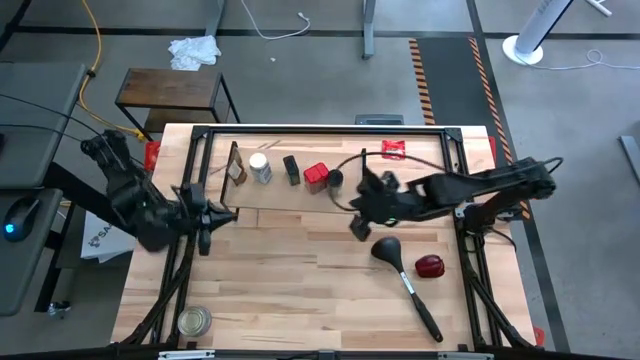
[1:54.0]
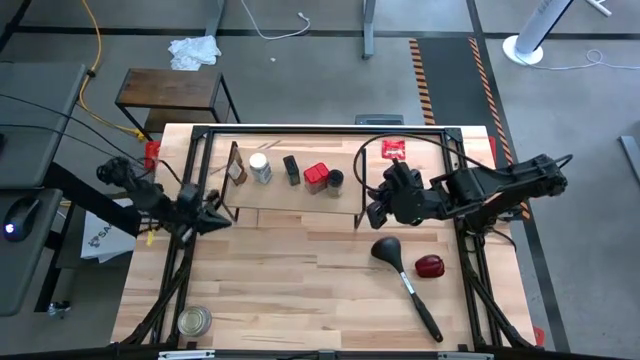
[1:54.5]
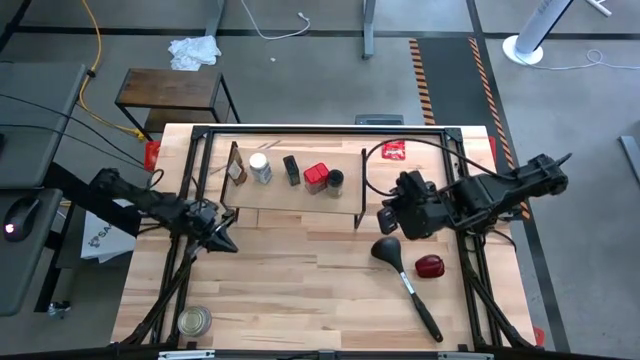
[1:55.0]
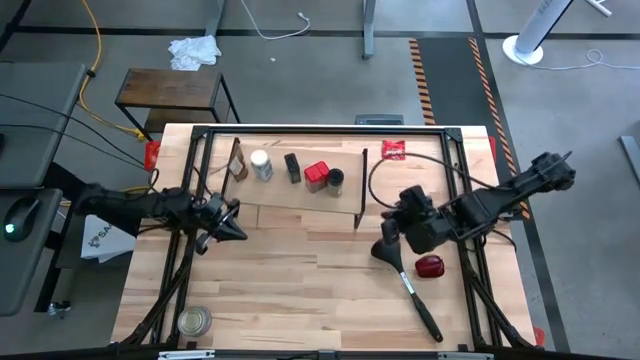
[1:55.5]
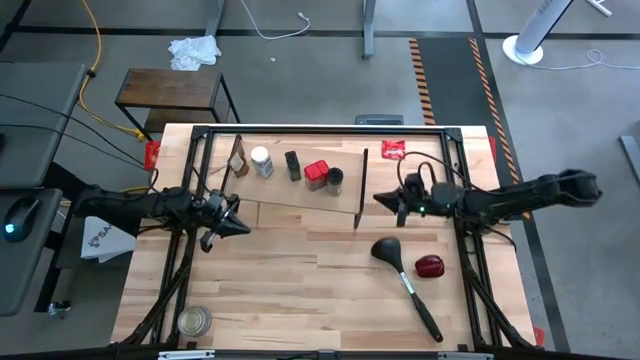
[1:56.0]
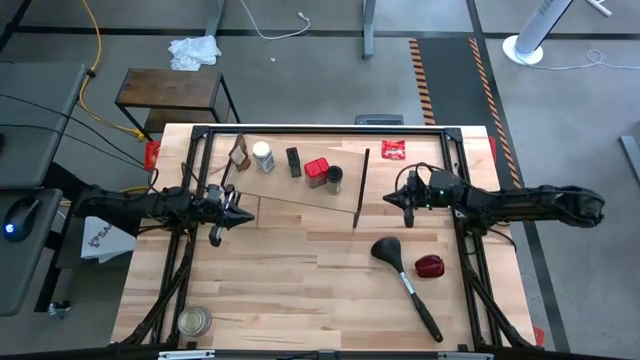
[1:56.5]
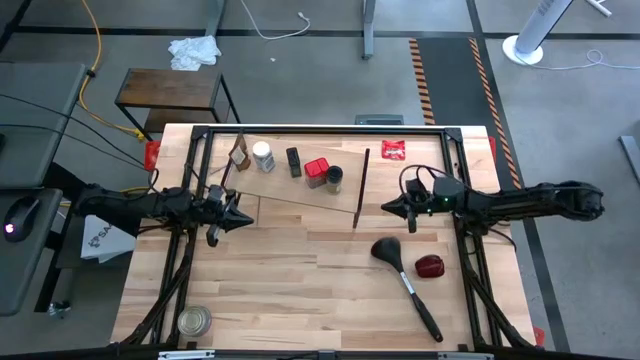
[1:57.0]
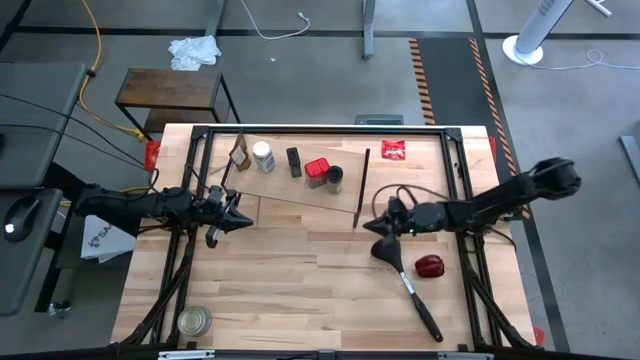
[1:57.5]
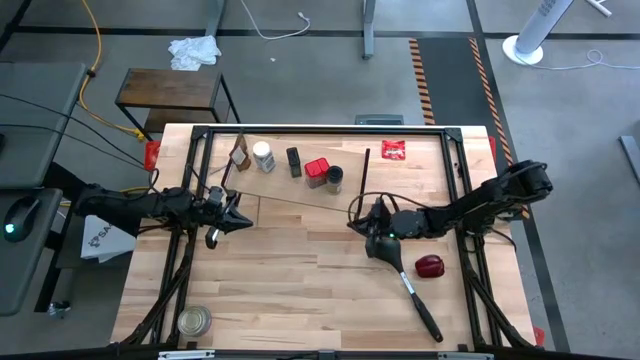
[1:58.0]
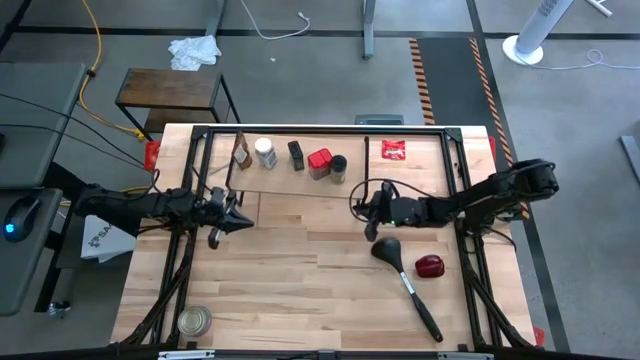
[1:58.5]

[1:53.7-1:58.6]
Task: Shelf spices
Adjust the shelf

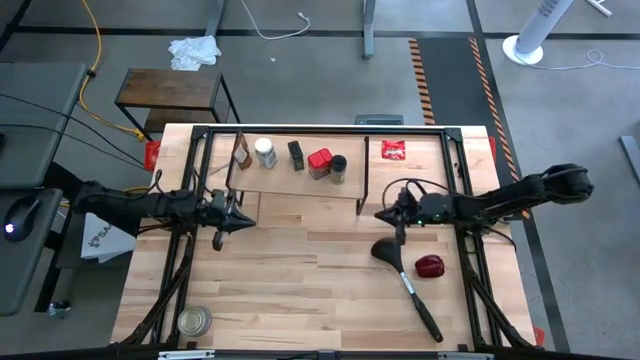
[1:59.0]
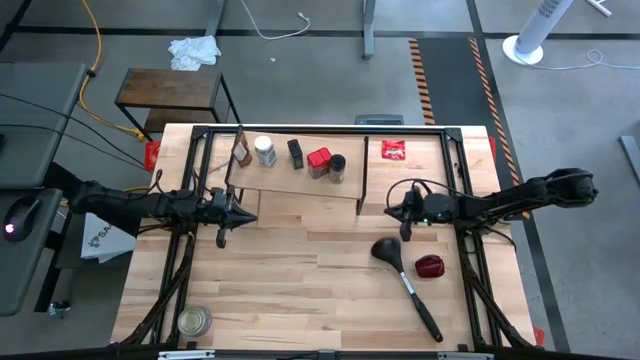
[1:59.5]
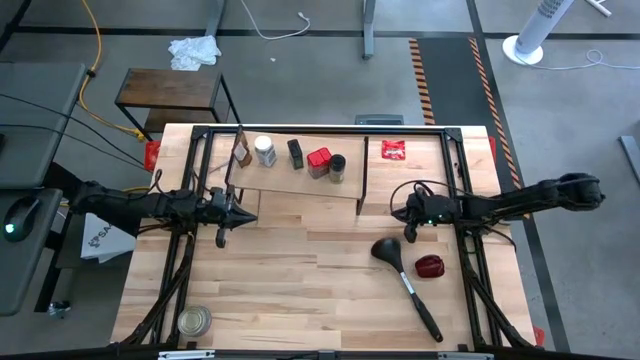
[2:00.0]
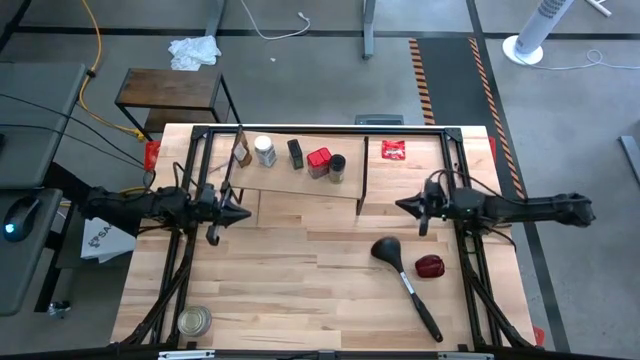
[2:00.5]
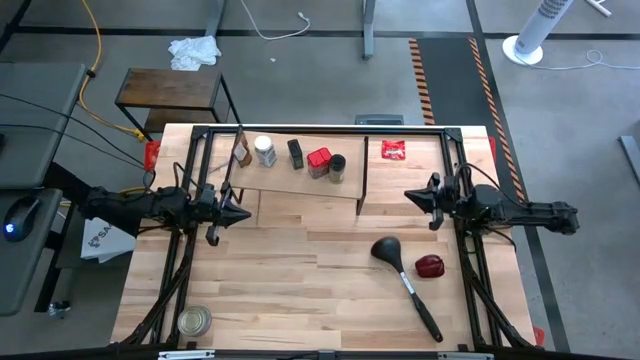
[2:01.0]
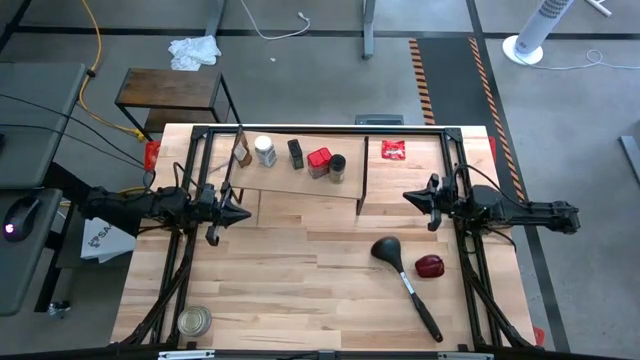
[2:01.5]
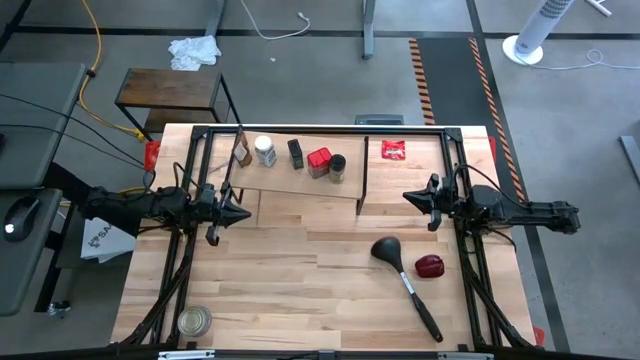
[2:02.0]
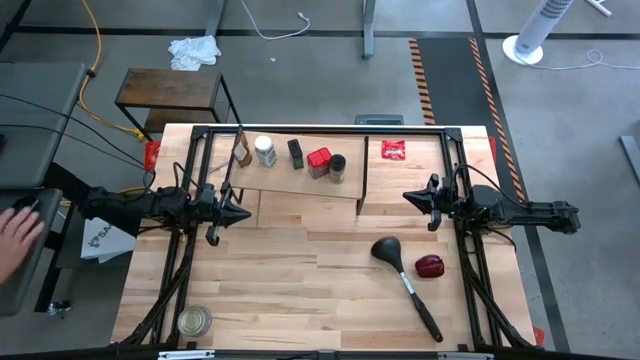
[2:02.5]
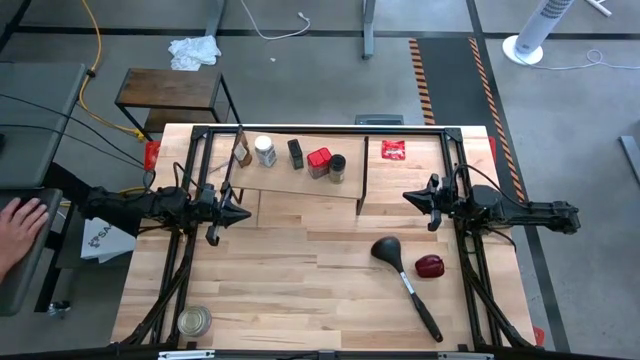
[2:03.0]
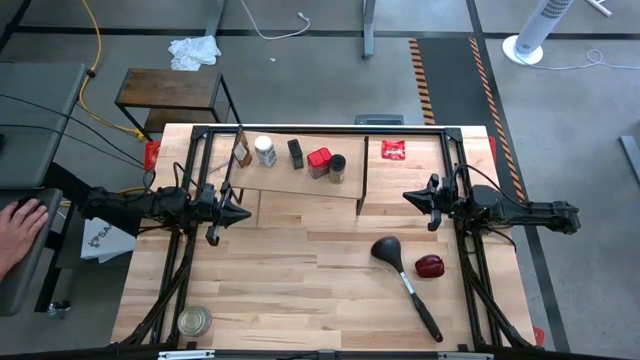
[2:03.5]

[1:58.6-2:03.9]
Return to Home Position

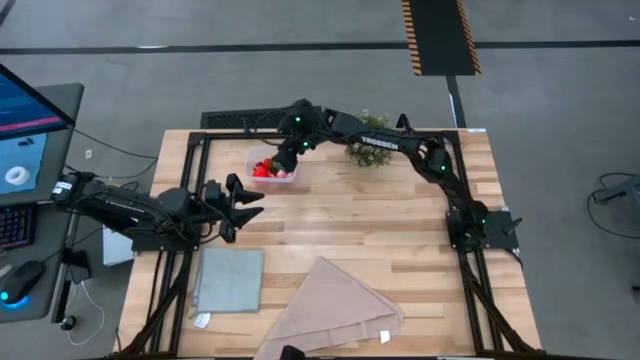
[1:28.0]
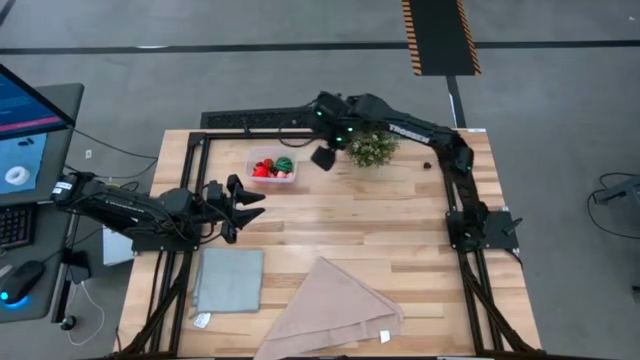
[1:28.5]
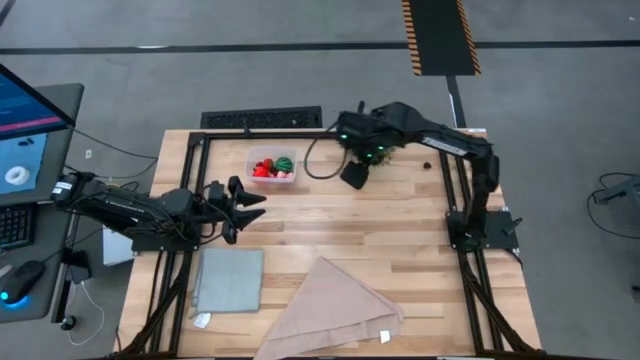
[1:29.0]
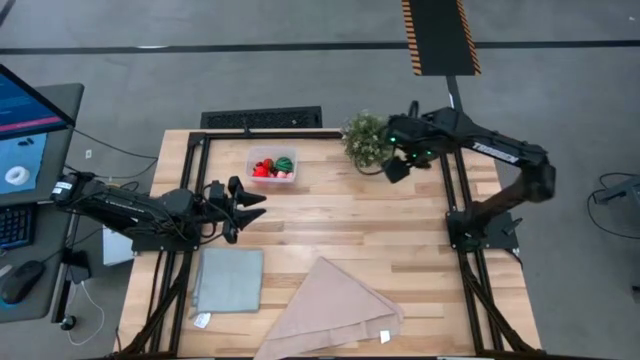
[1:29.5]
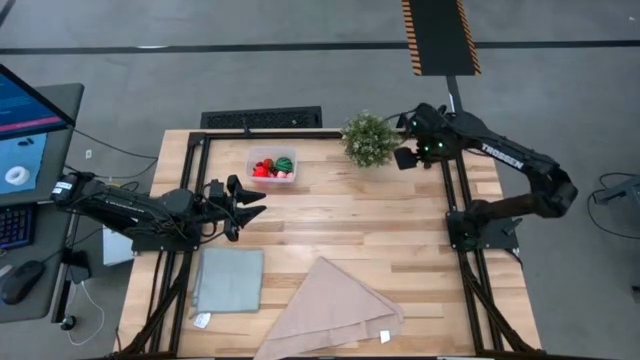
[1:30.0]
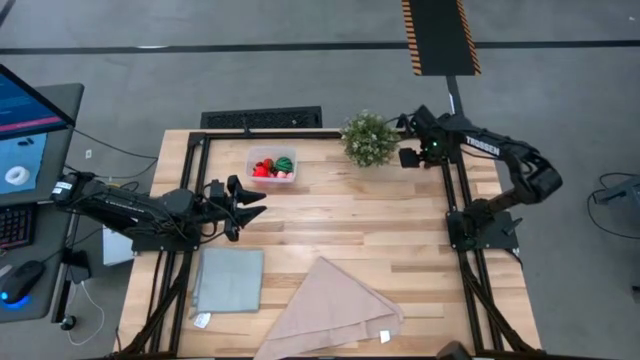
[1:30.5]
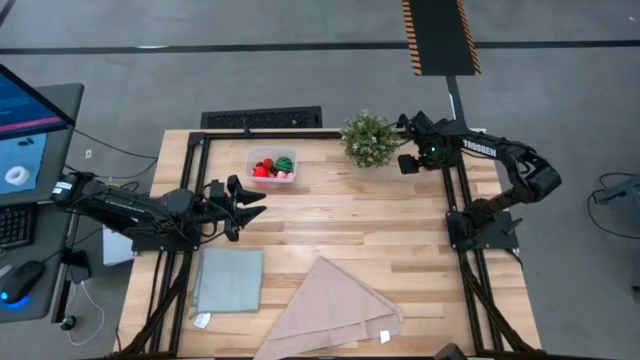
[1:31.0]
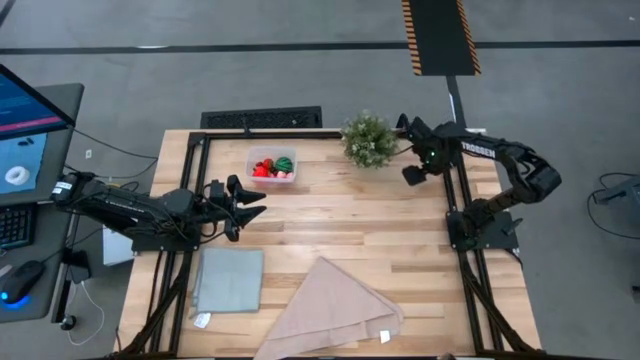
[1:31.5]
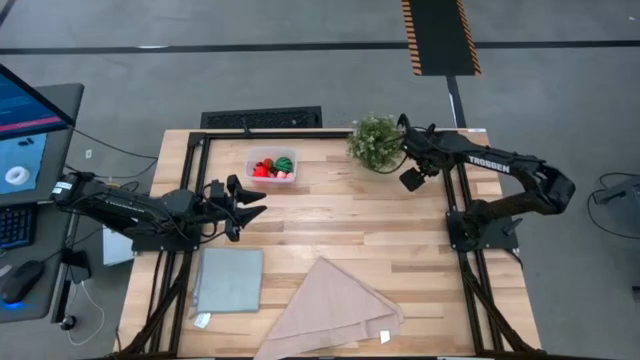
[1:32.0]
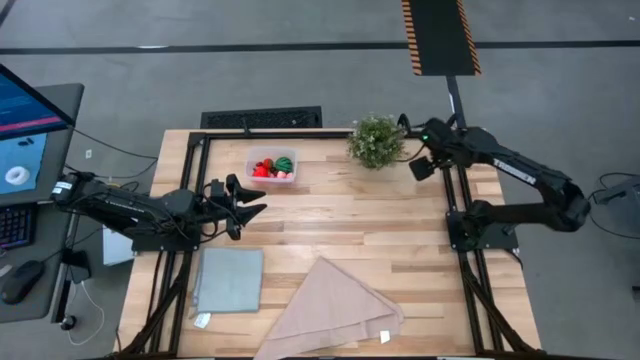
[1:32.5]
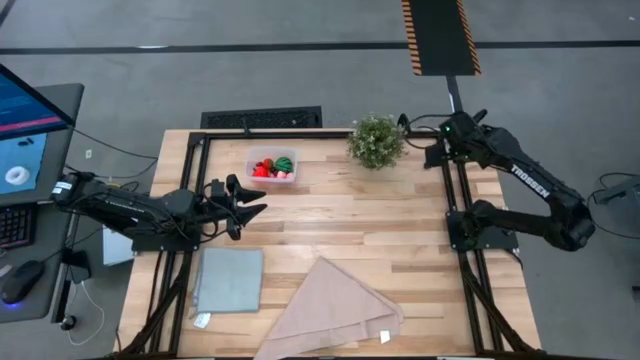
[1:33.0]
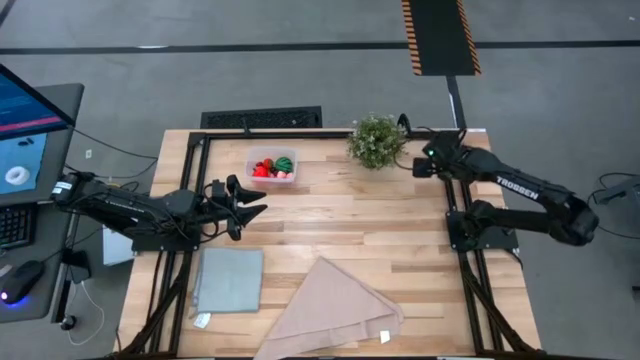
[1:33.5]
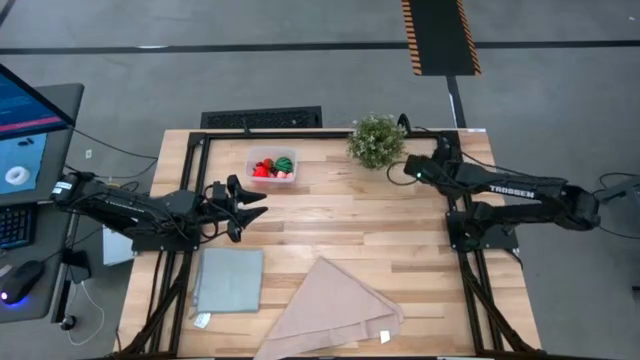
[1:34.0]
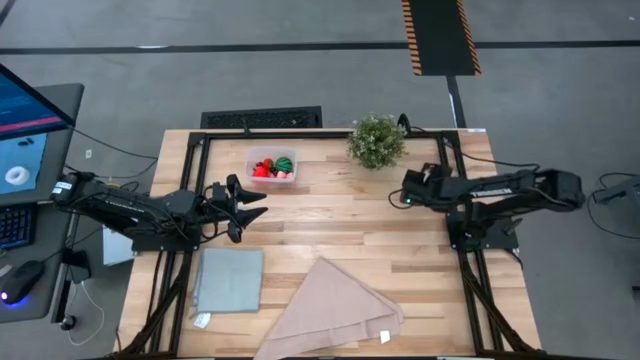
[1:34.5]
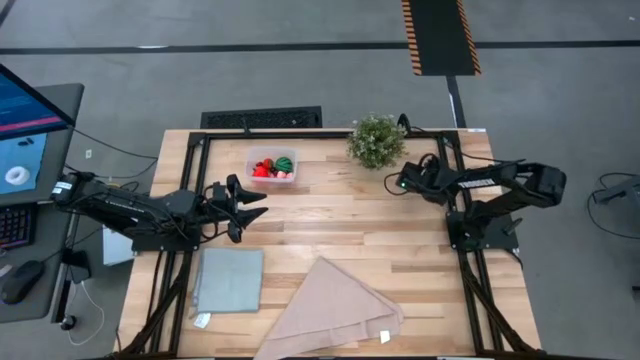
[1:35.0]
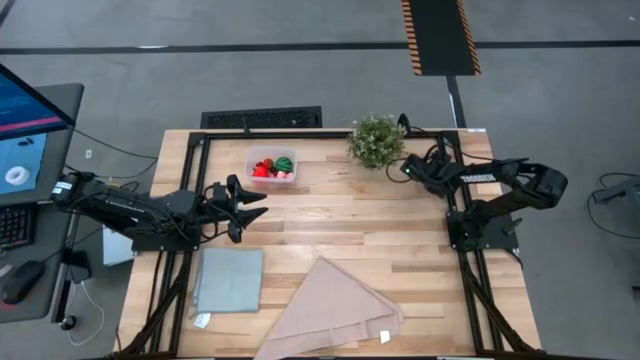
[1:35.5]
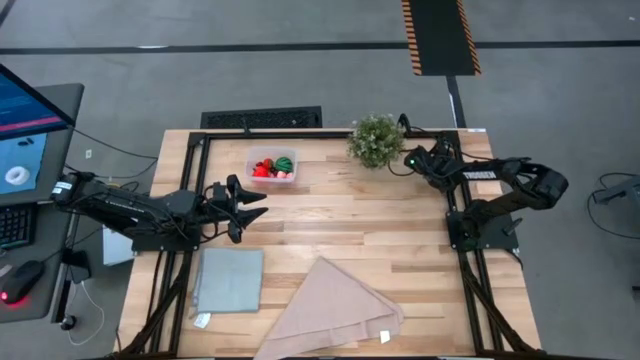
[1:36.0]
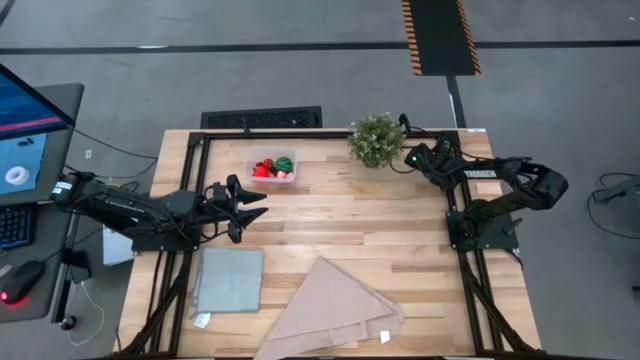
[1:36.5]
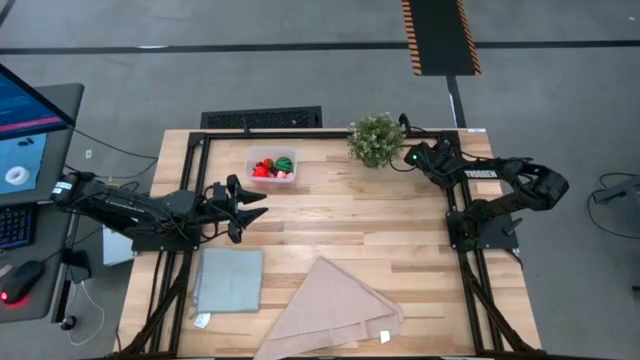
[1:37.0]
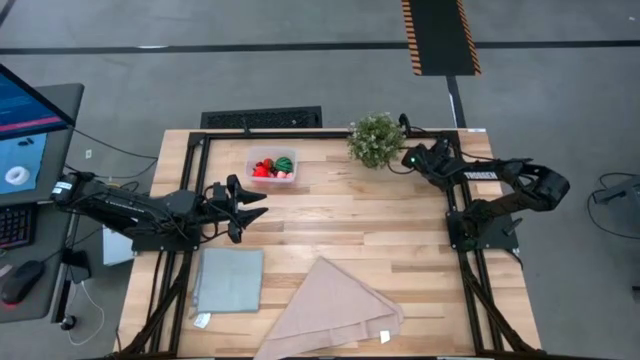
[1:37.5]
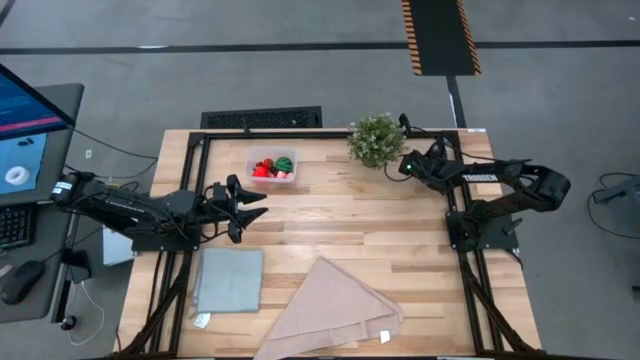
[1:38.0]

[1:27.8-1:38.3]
Task: Pick and placing Produce into tupperware
Put the blackberry into the transparent container
